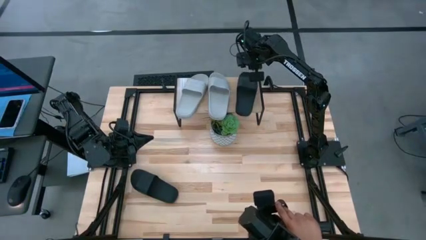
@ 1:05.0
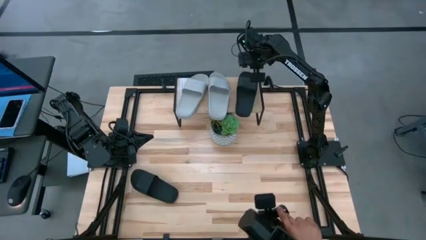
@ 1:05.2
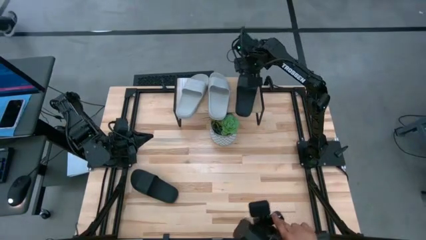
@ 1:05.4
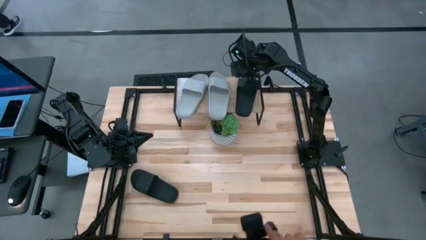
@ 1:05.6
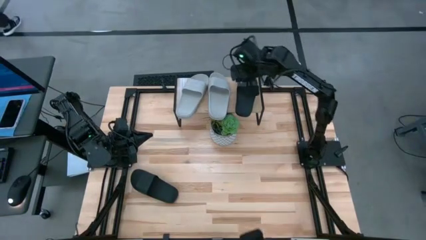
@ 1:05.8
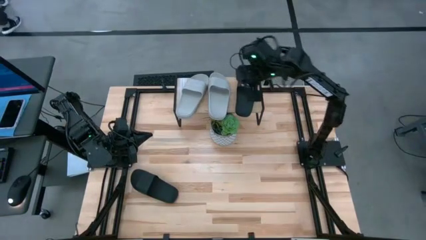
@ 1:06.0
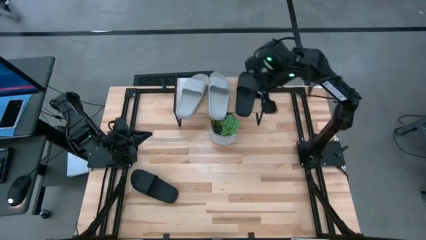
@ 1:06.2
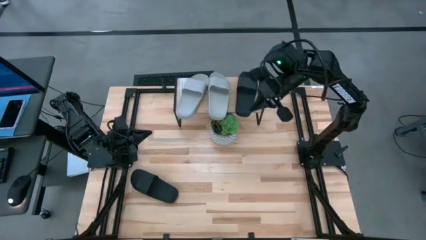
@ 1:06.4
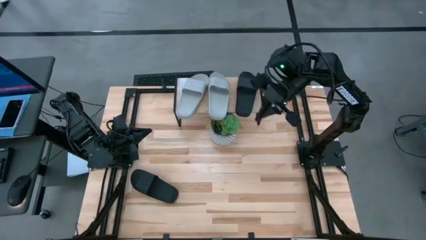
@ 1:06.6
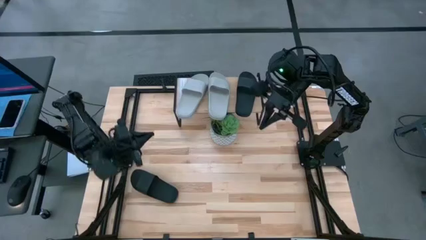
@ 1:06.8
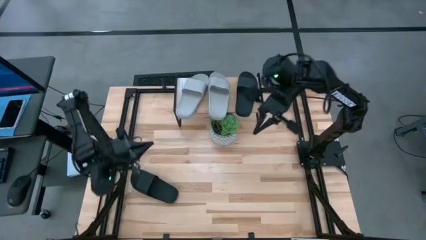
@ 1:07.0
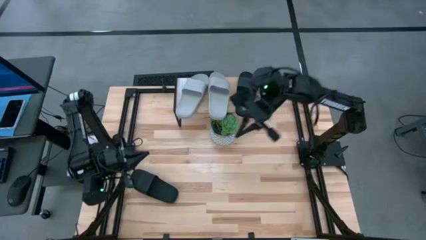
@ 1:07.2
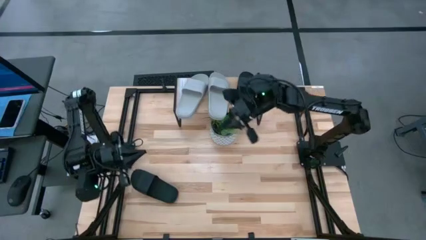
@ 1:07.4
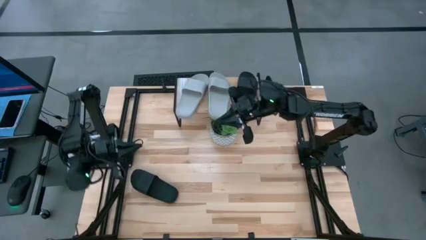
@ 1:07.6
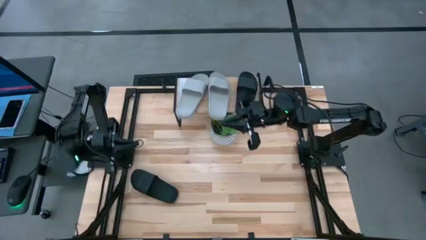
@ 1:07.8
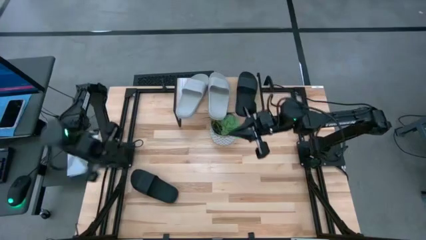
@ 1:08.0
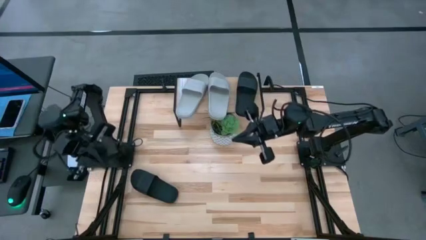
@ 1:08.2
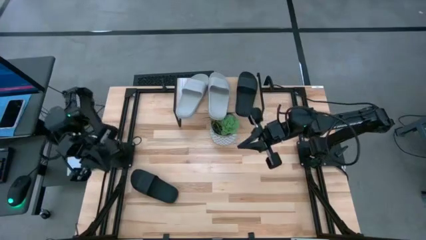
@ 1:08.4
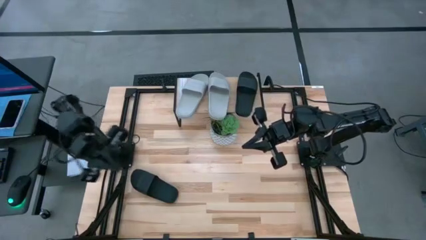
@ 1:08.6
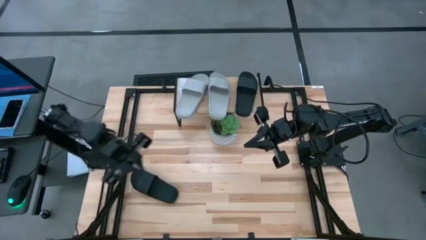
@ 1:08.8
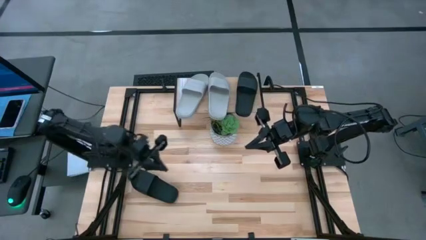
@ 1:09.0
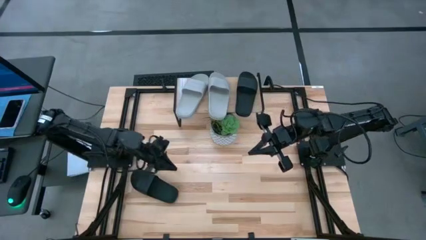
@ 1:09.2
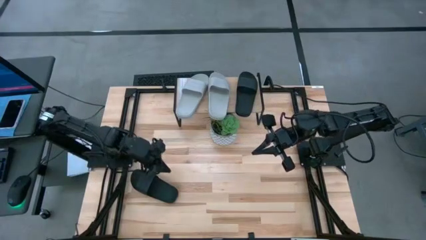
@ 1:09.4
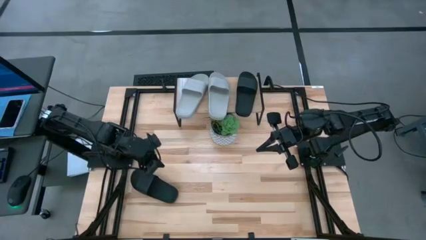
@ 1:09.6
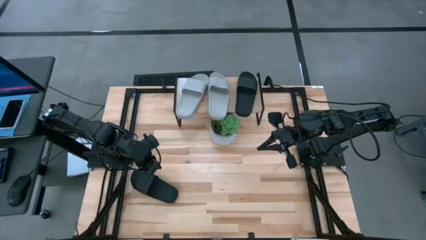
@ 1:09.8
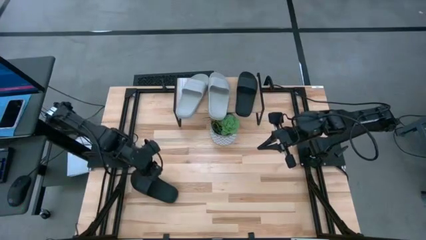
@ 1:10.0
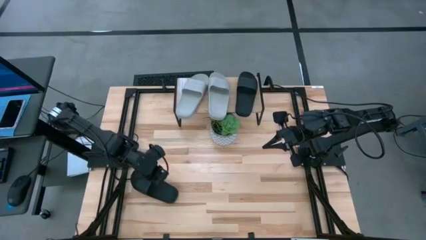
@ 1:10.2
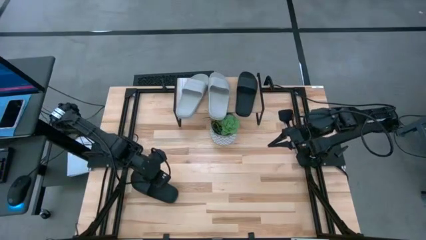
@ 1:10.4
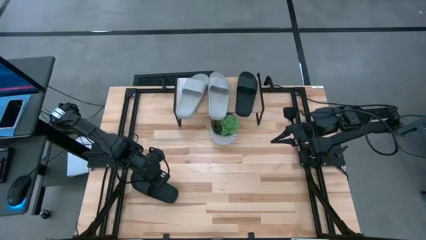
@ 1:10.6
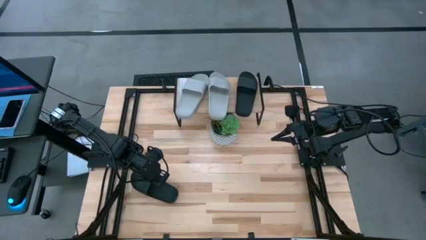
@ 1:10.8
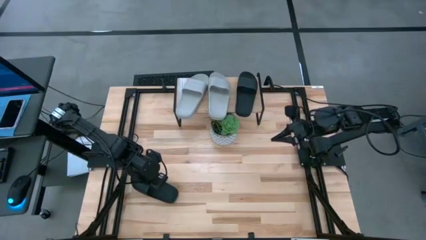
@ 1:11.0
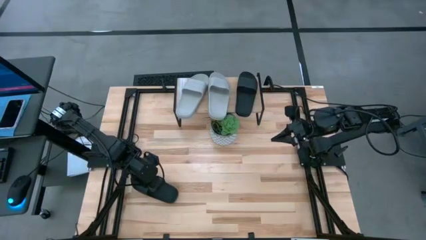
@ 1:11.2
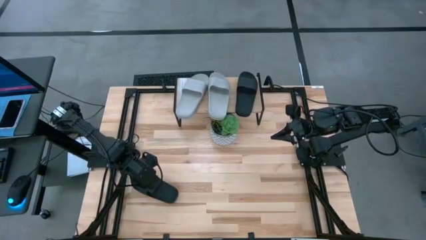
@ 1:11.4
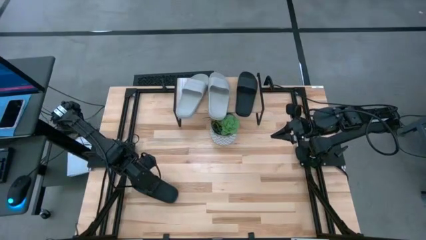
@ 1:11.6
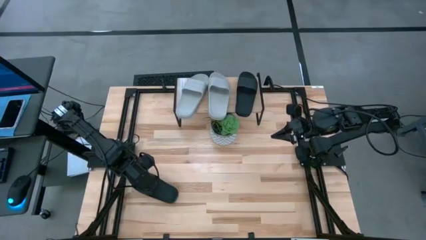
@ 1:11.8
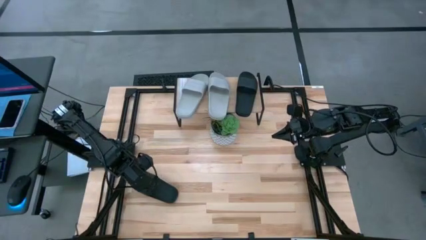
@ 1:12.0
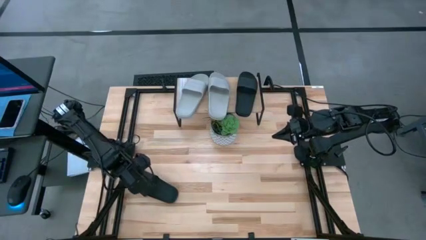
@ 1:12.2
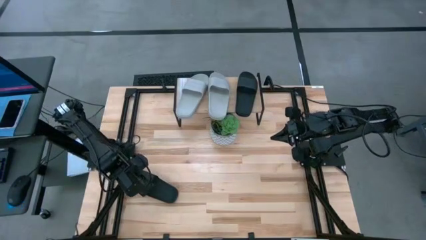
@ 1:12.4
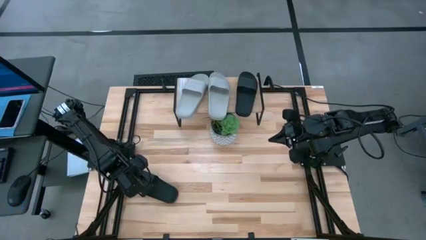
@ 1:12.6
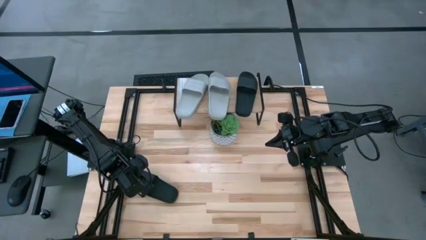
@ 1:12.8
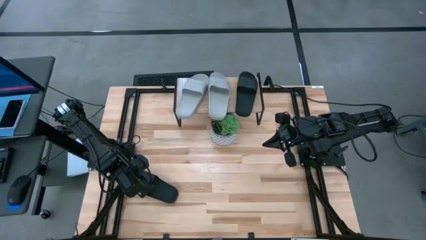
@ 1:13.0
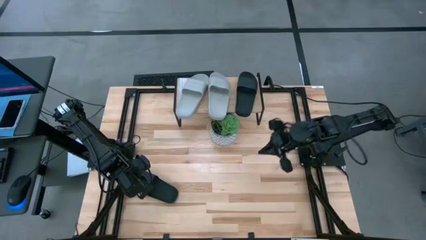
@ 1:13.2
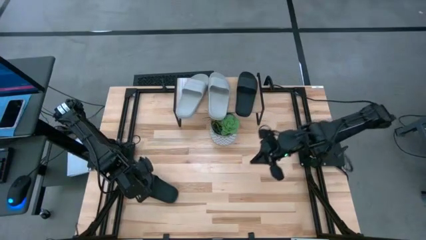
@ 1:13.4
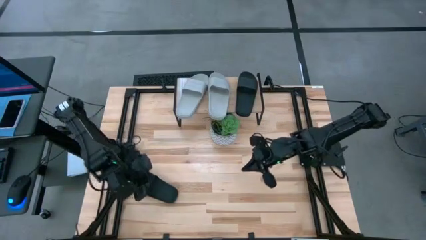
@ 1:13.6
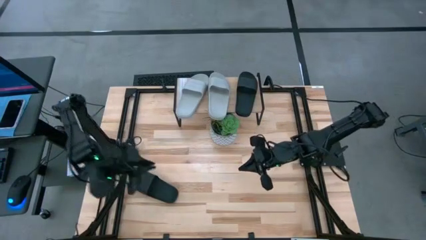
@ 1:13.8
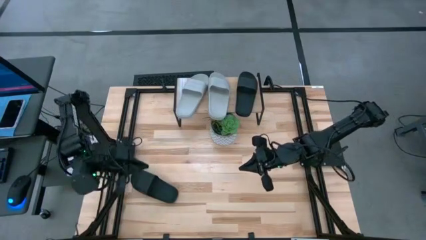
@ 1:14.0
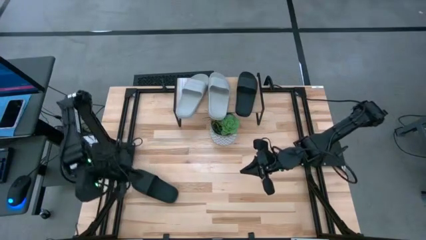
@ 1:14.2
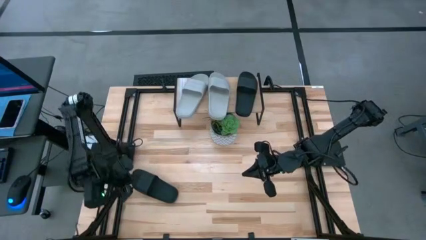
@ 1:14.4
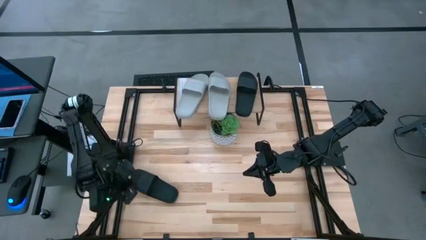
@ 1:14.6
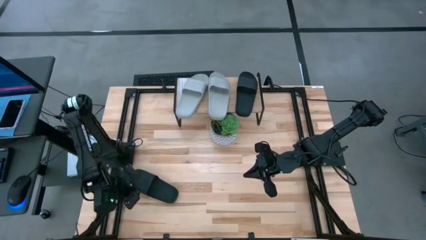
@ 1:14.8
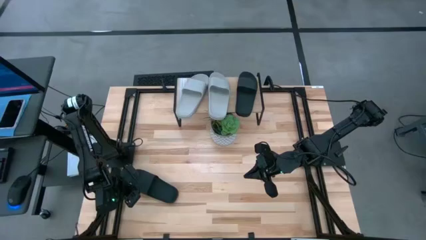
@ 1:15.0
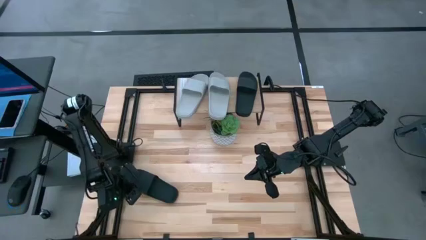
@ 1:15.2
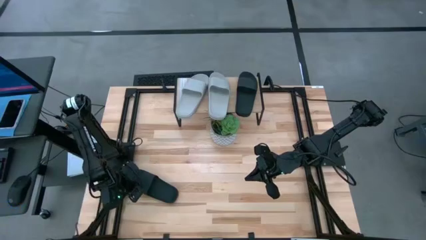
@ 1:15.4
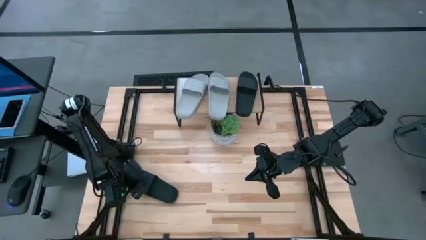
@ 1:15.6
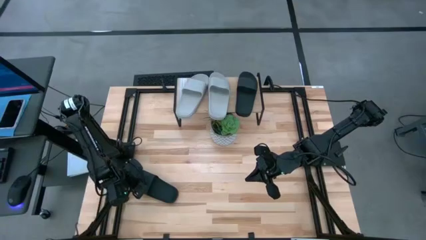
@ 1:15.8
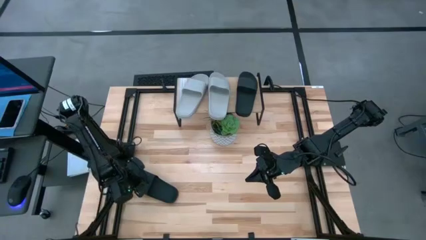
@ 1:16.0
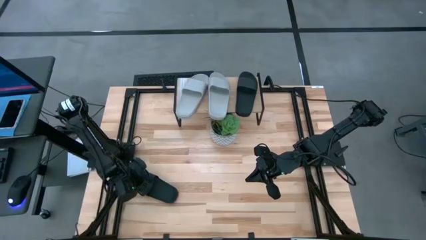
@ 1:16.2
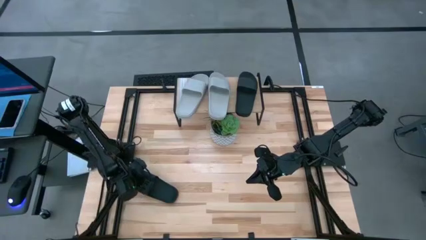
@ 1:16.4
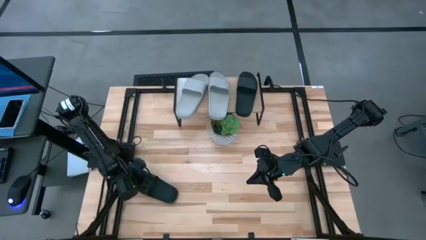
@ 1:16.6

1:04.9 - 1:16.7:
Task: Pick and place slides into the shelf
Put the black slide on the shelf

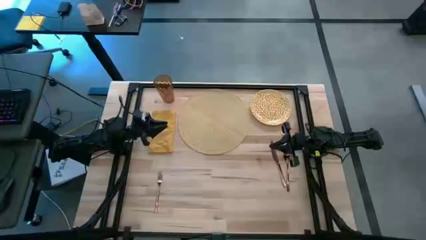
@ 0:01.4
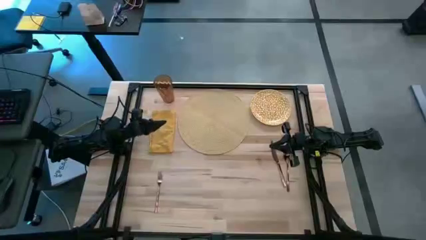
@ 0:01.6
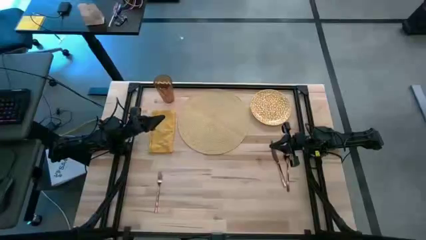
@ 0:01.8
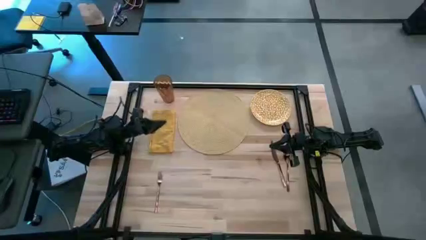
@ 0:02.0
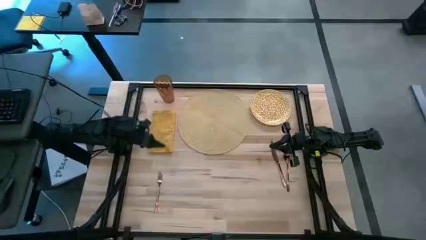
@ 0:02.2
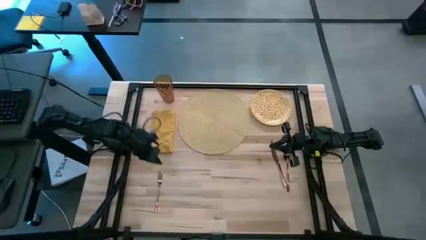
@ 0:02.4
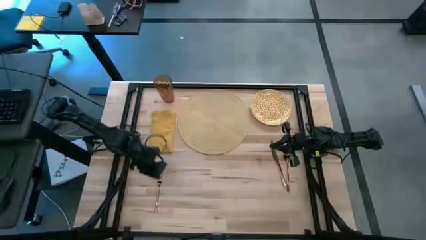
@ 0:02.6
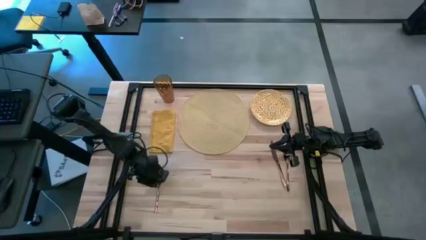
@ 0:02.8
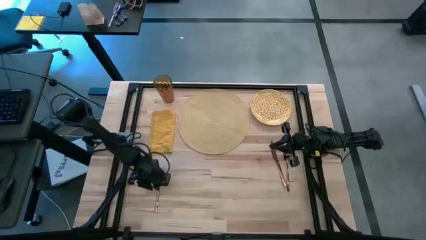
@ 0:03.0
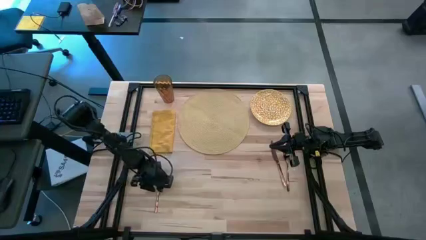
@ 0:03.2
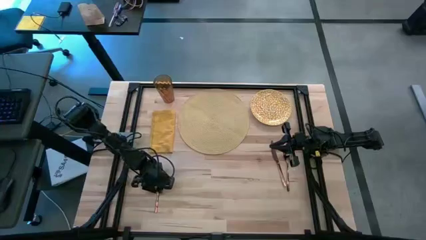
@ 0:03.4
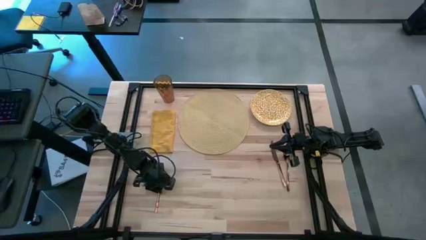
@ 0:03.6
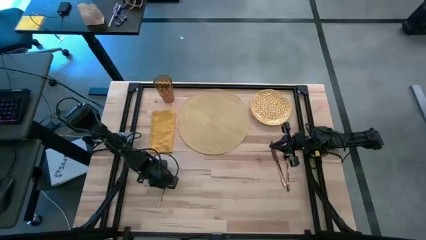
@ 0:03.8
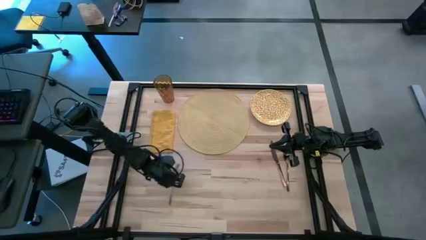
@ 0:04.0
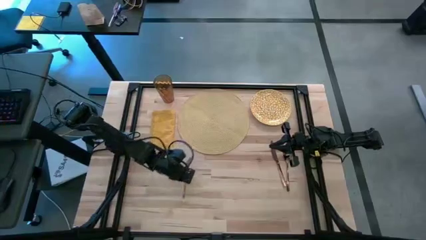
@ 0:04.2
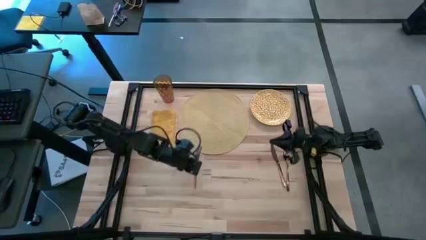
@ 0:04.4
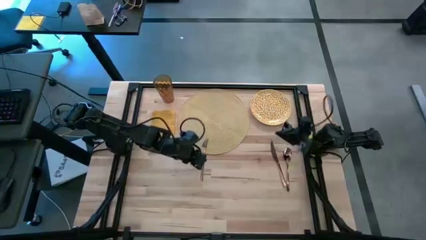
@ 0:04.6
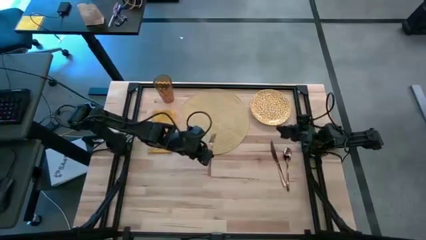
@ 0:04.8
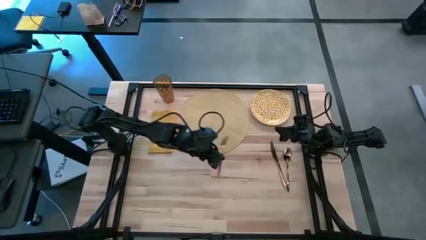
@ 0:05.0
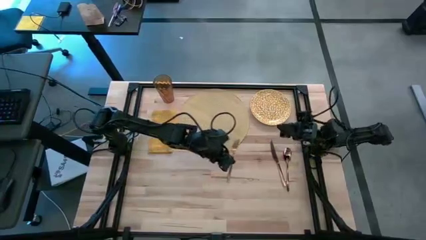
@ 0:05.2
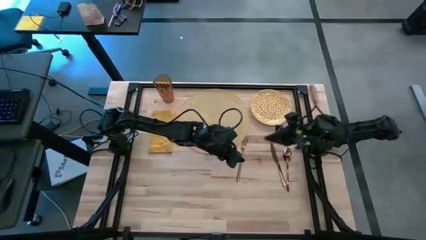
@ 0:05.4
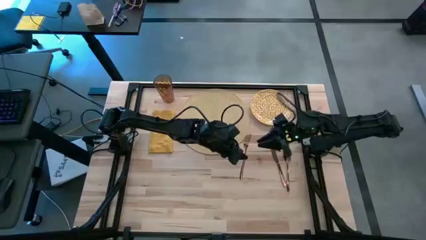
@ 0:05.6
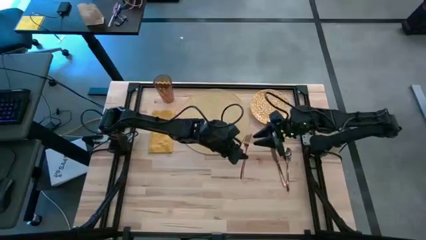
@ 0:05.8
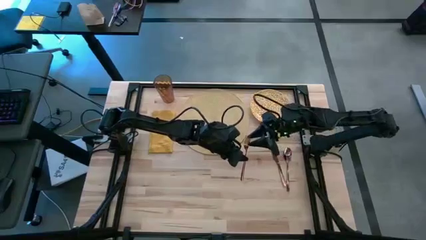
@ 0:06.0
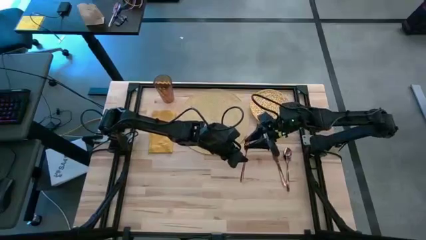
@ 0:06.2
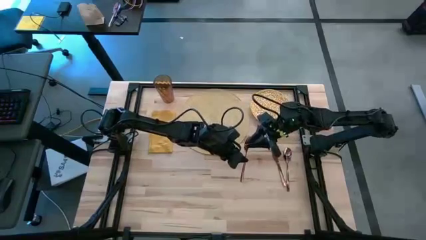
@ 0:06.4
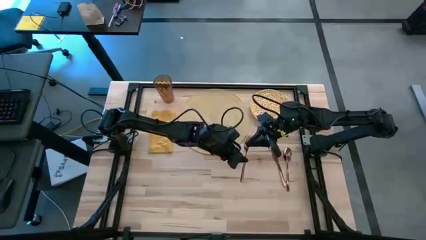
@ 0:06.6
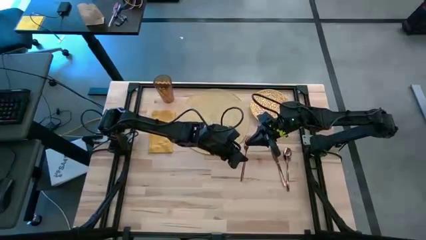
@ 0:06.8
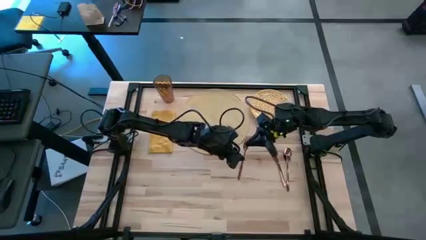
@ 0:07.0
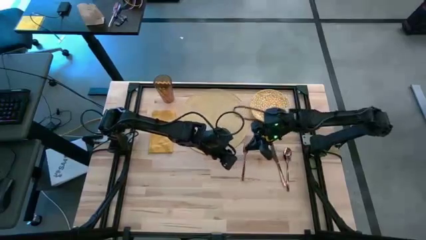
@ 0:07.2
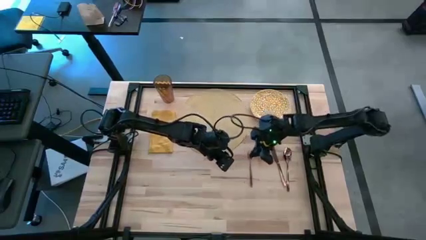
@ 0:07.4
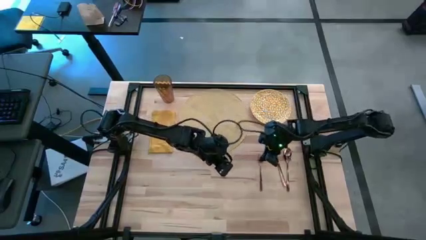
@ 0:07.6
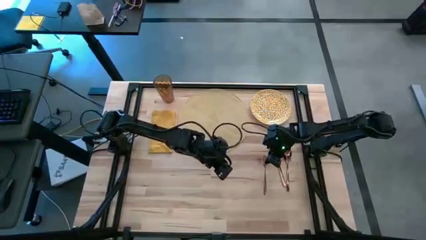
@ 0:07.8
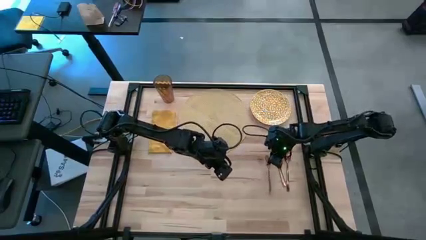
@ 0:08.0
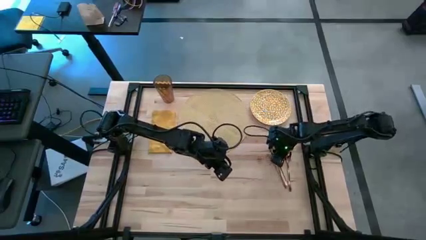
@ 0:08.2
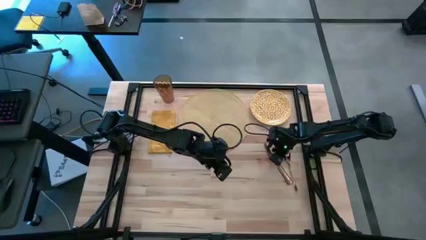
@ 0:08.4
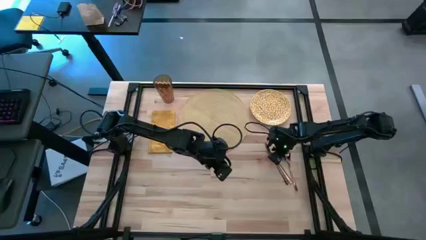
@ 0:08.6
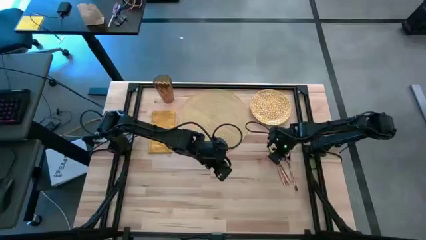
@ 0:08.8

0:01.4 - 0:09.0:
Task: Set table place
Move the light brown fork to the middle right of the table
